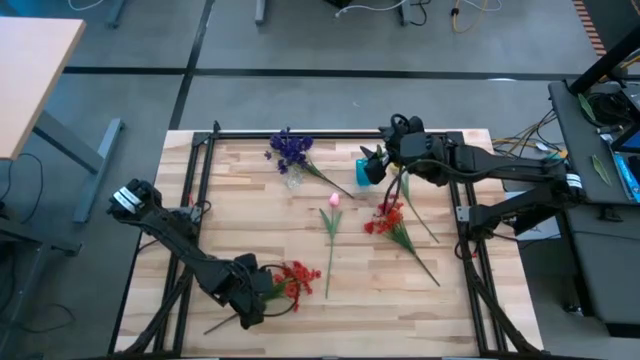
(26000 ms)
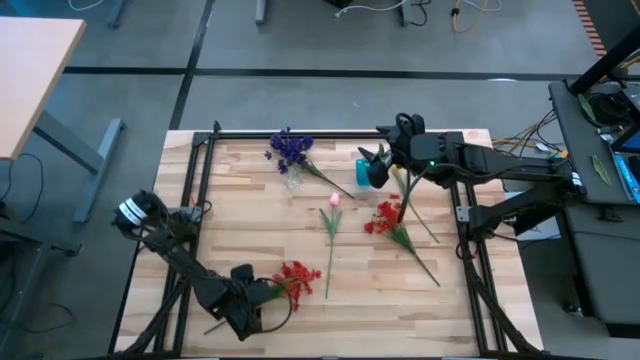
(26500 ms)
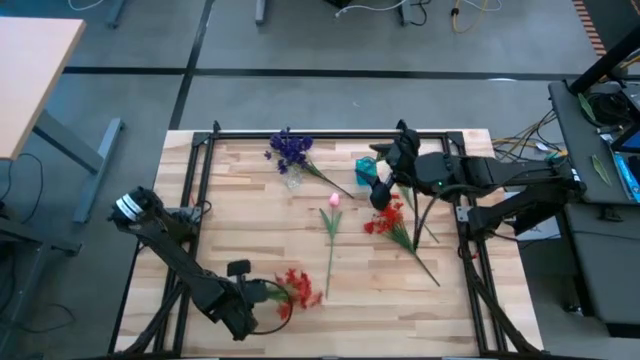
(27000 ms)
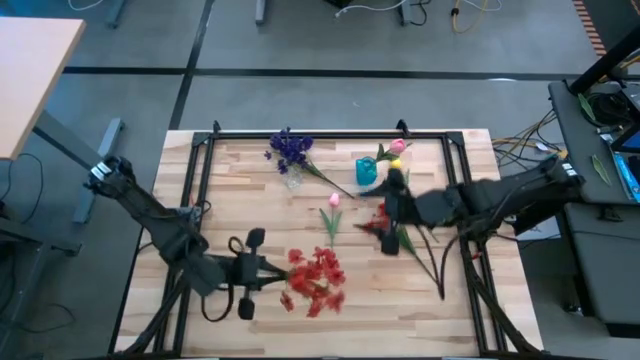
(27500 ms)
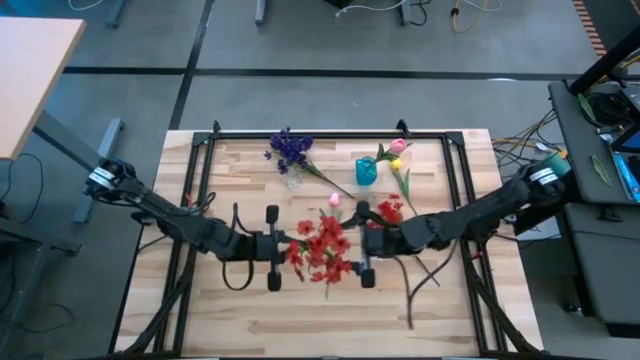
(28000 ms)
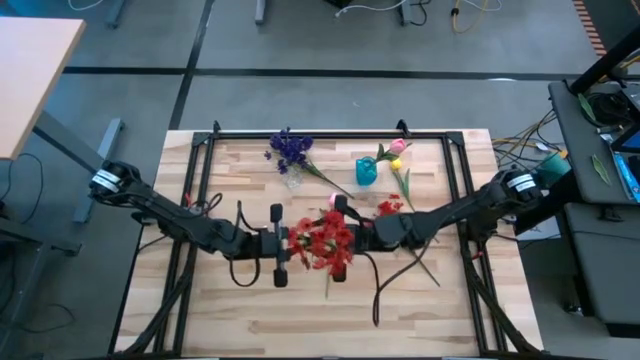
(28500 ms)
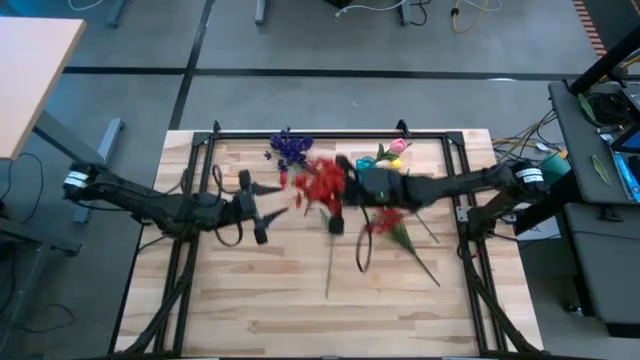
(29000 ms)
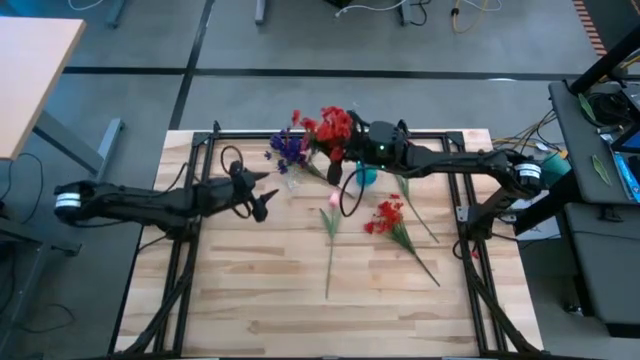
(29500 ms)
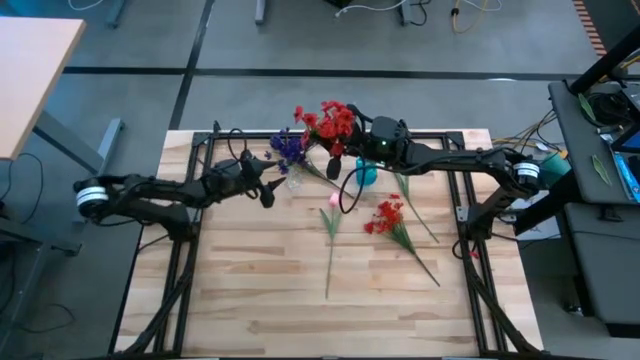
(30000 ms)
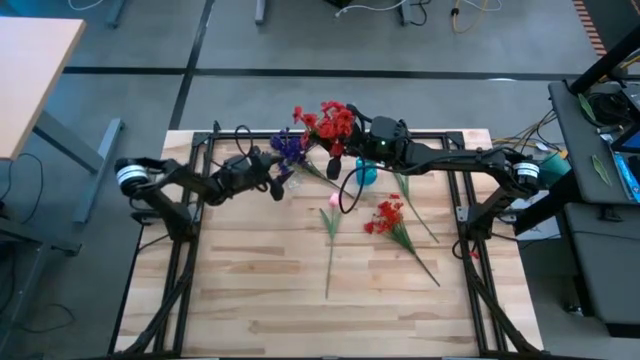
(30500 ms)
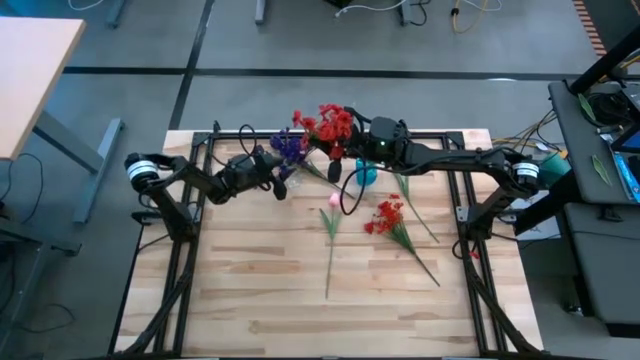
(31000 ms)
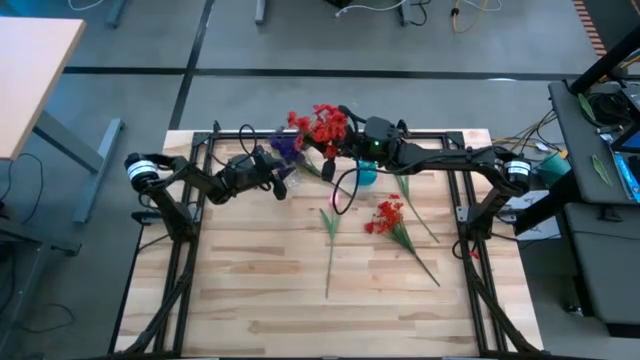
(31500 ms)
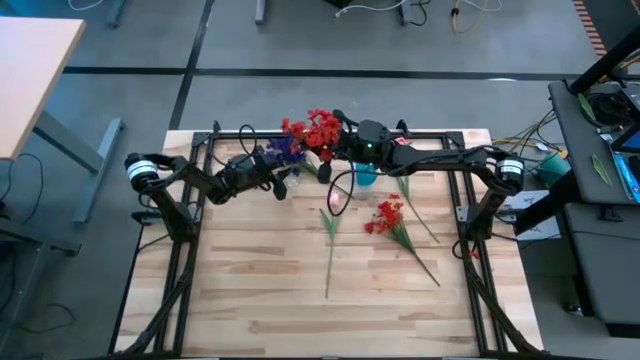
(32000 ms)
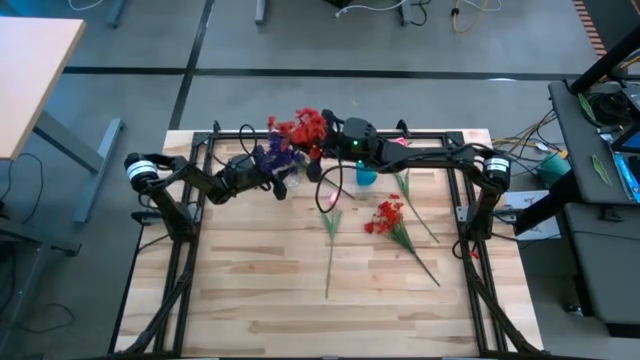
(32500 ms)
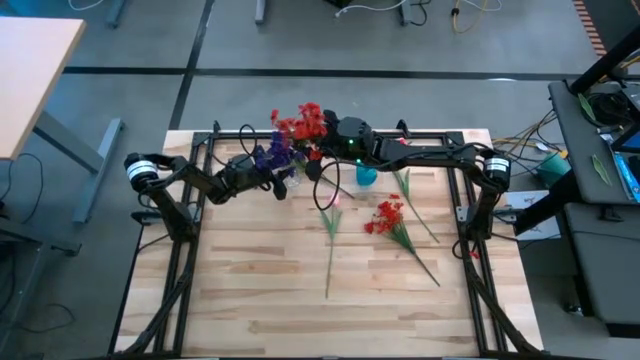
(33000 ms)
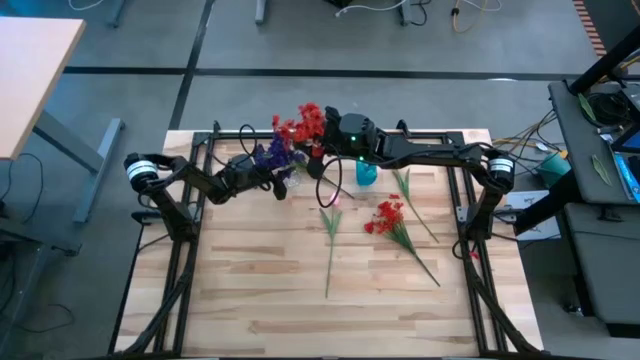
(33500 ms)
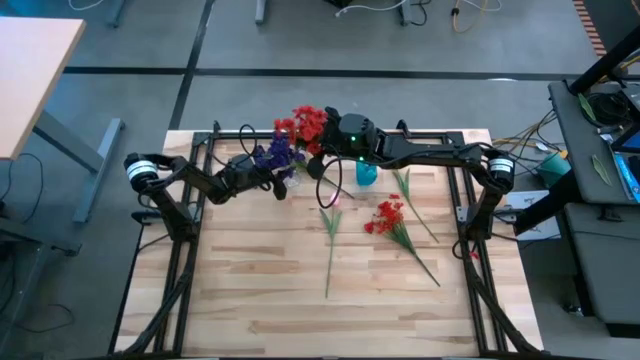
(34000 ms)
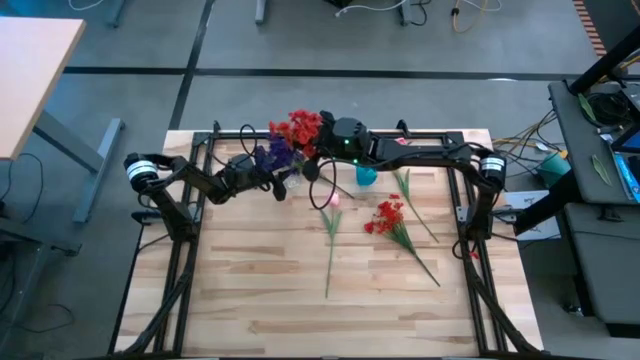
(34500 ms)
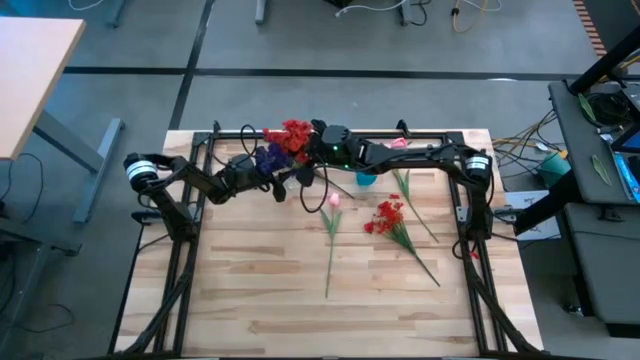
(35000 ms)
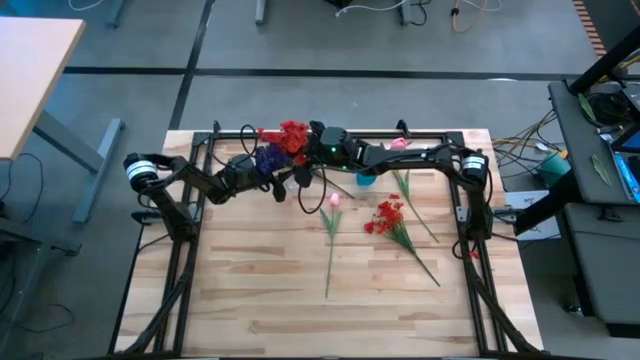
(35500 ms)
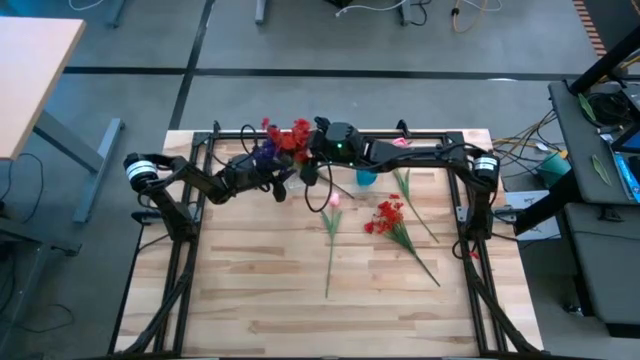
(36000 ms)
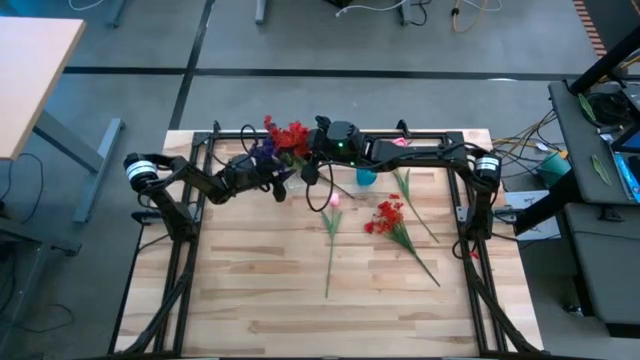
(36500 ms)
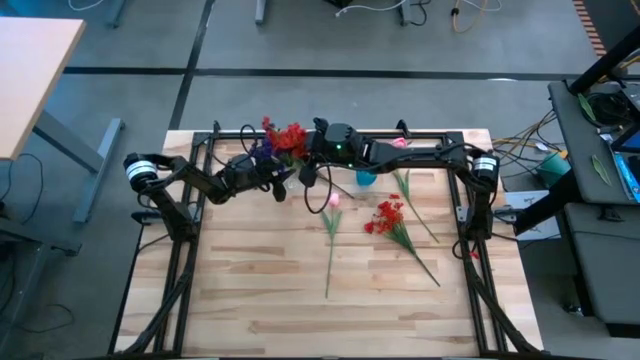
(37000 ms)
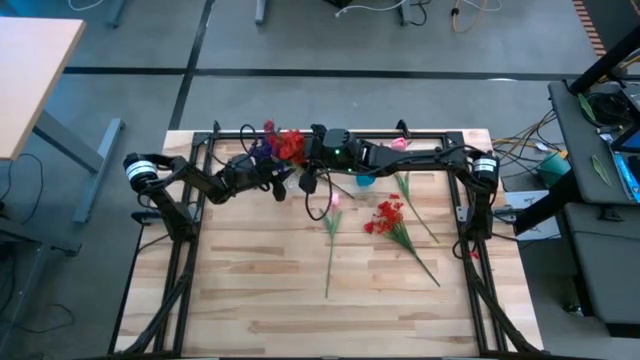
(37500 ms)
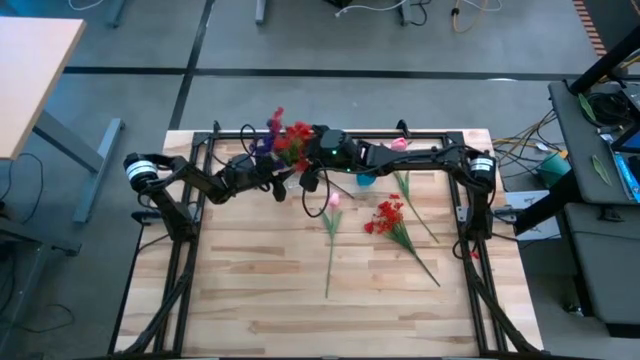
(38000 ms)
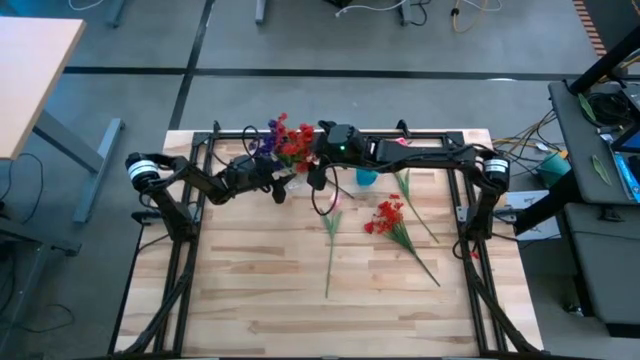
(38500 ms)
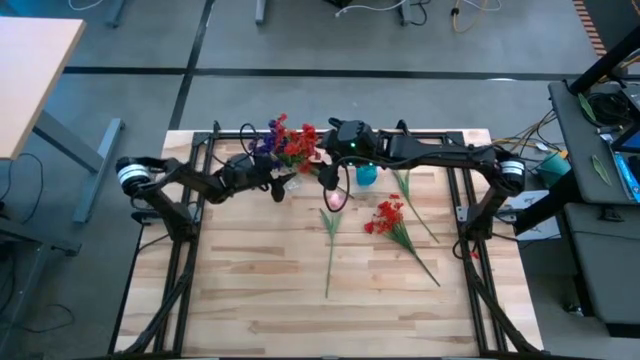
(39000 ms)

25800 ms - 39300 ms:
Task: Sort flowers into vase by color
Put the bottom red flowers into the transparent vase

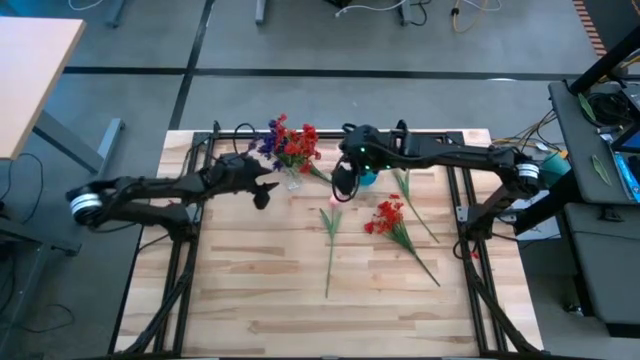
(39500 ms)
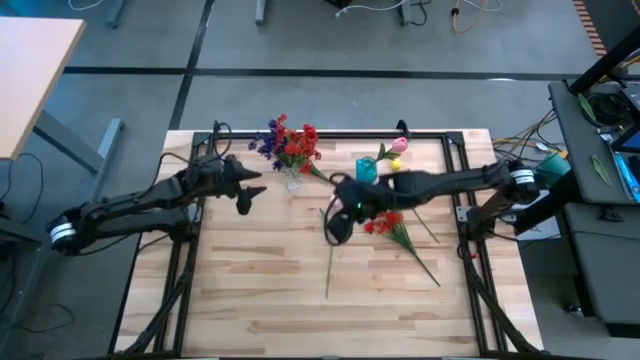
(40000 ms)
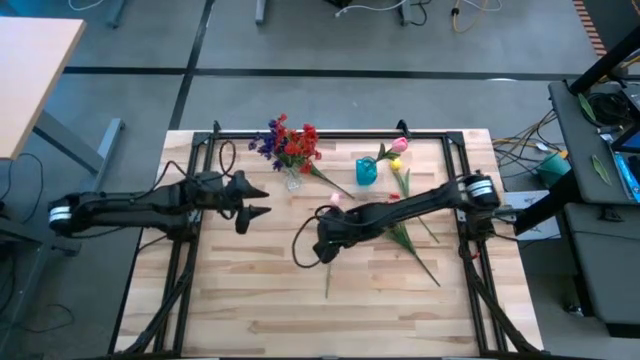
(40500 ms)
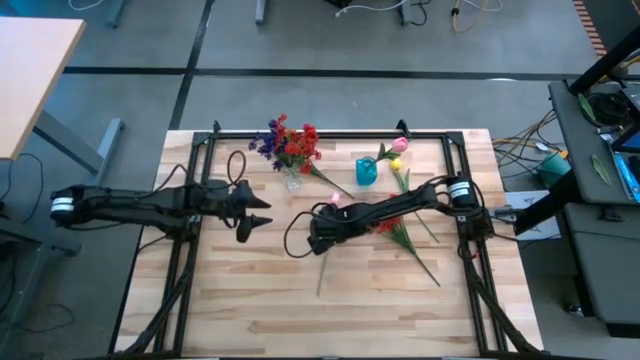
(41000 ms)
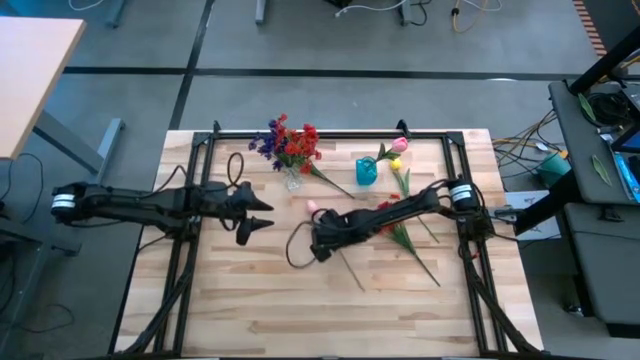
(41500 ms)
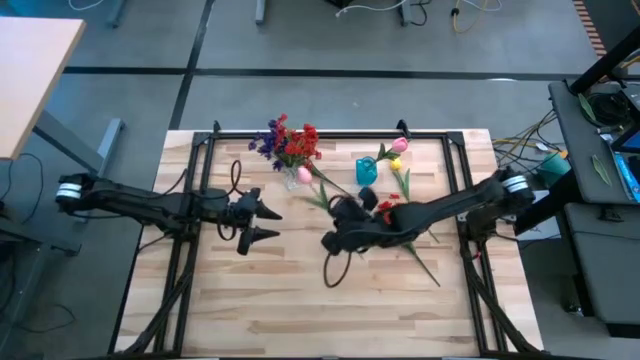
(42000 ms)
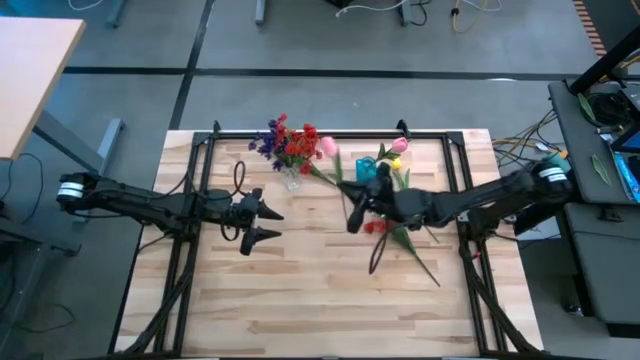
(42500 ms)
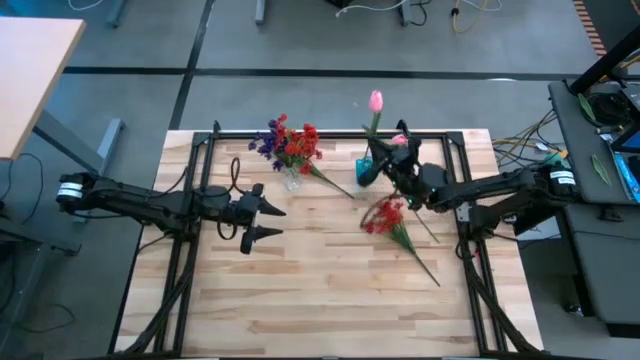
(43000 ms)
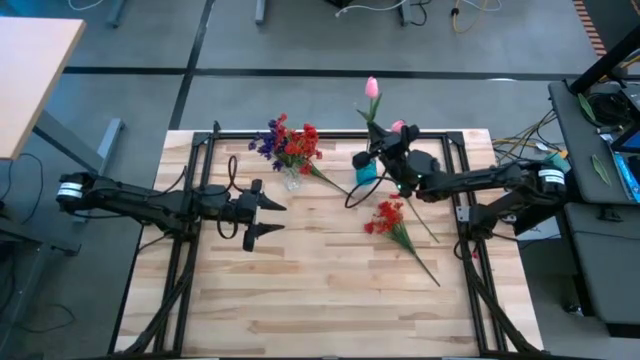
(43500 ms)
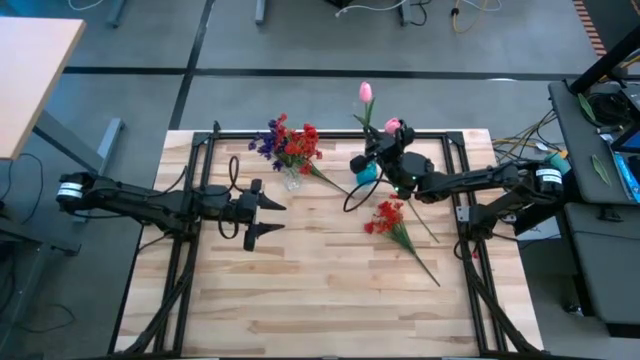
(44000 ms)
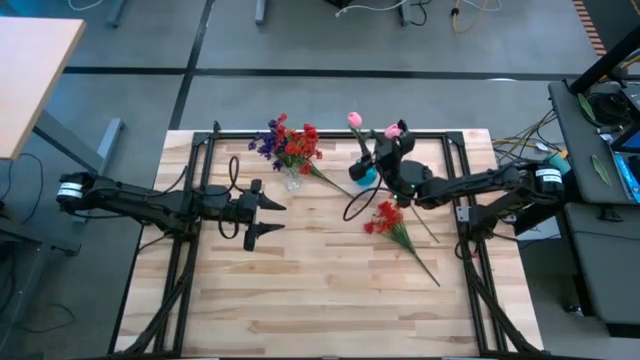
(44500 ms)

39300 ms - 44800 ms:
Put the pink flower into the blue vase

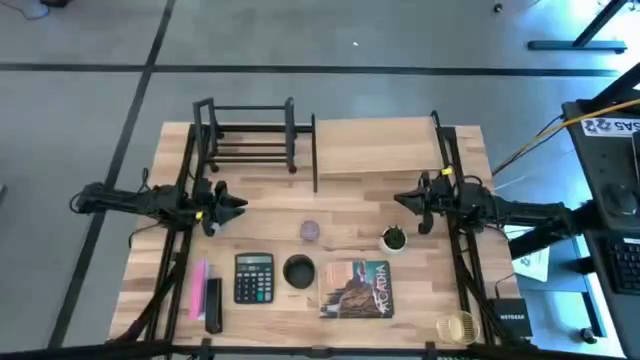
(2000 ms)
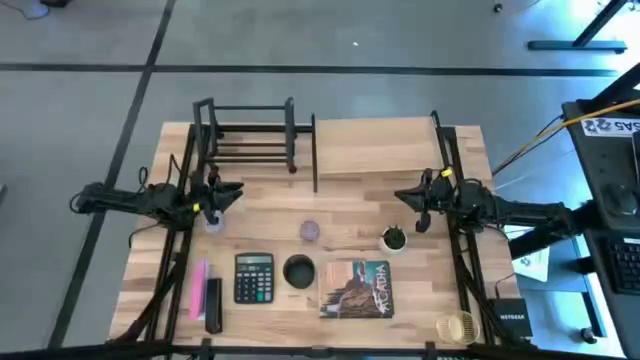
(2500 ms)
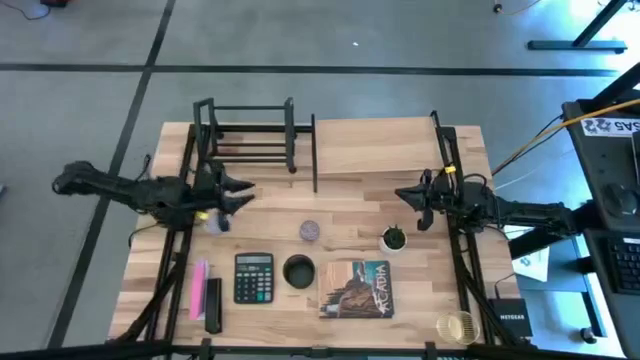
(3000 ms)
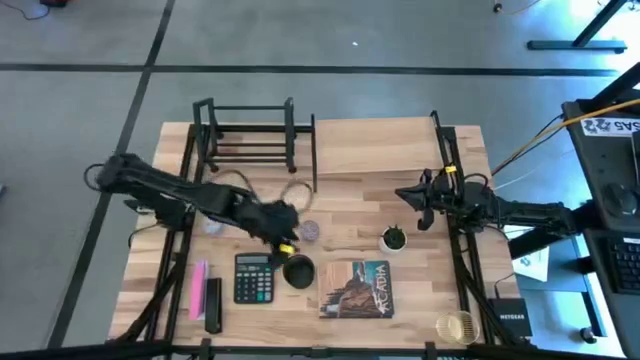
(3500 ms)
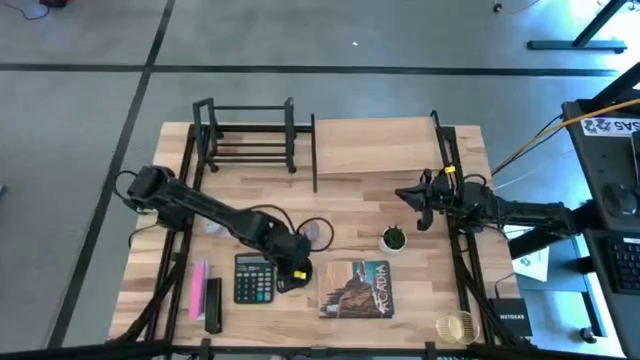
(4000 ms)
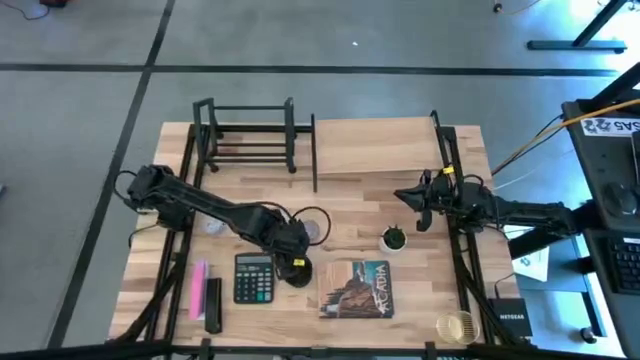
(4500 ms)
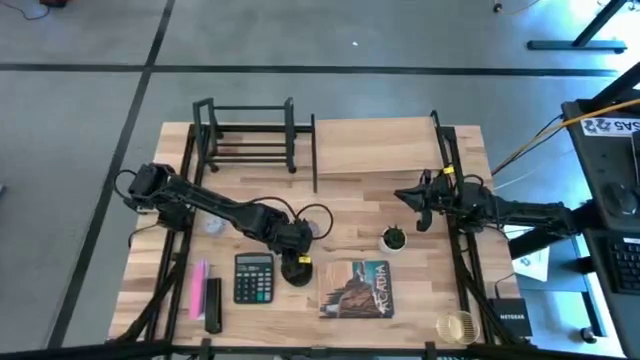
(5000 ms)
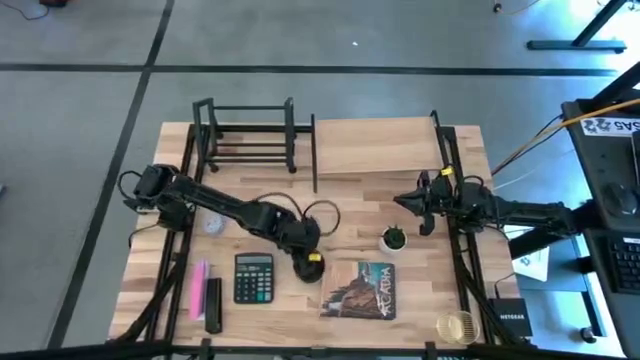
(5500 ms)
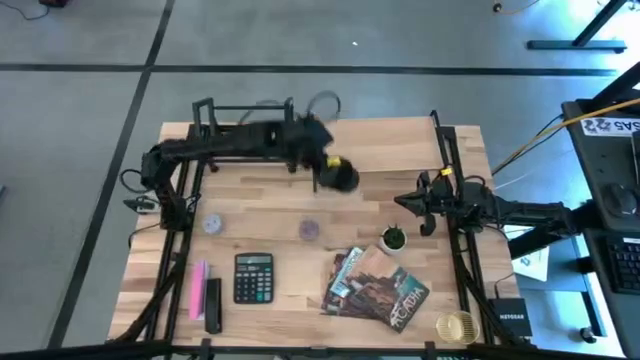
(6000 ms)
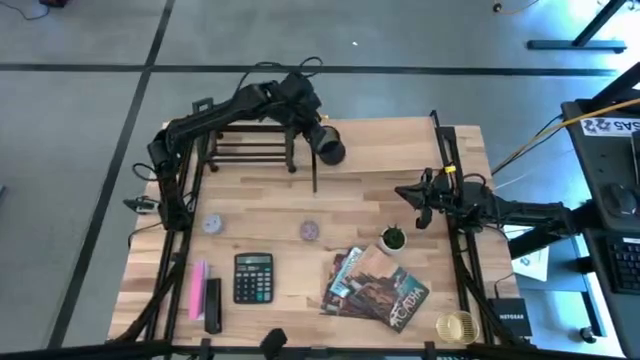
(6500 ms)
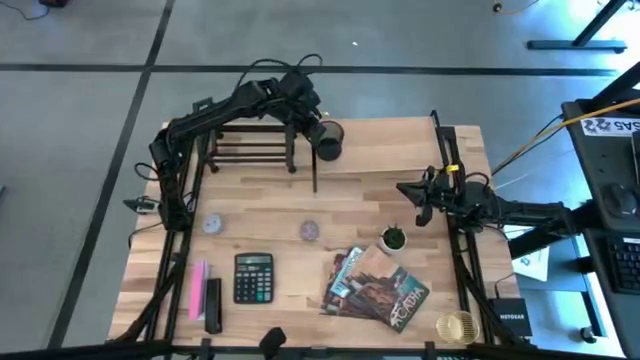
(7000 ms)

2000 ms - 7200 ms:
Task: Stock shelves
Put the black pen organizer on the shelf
